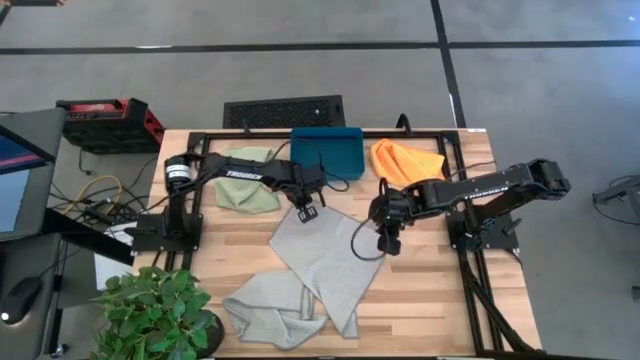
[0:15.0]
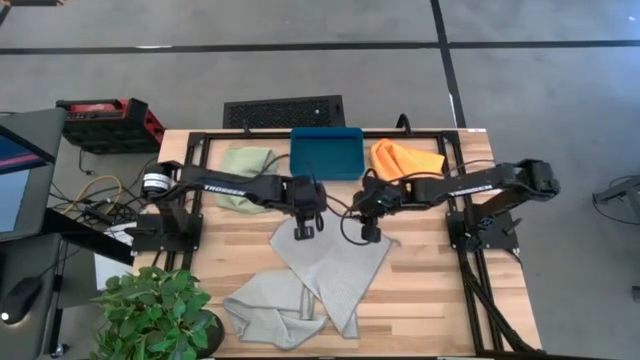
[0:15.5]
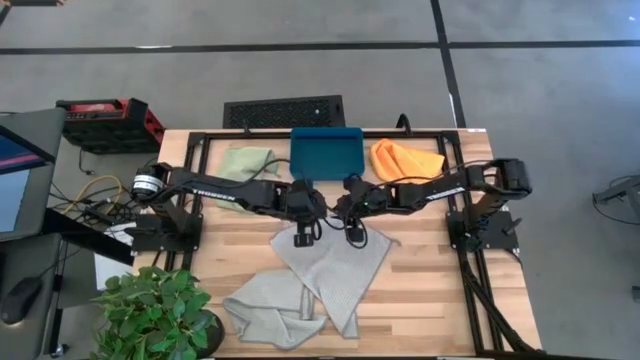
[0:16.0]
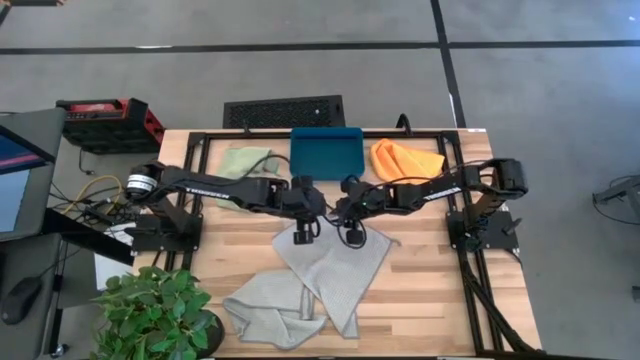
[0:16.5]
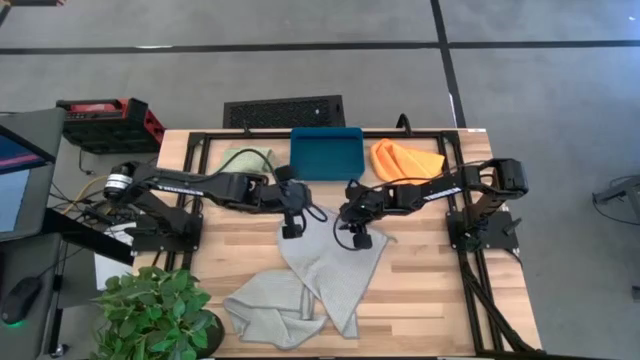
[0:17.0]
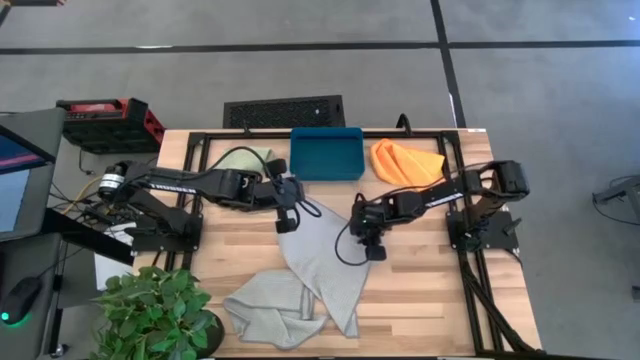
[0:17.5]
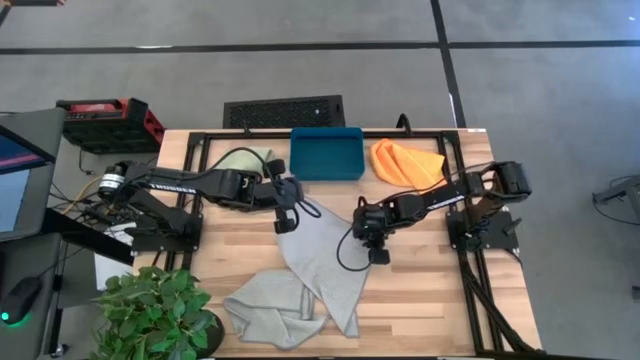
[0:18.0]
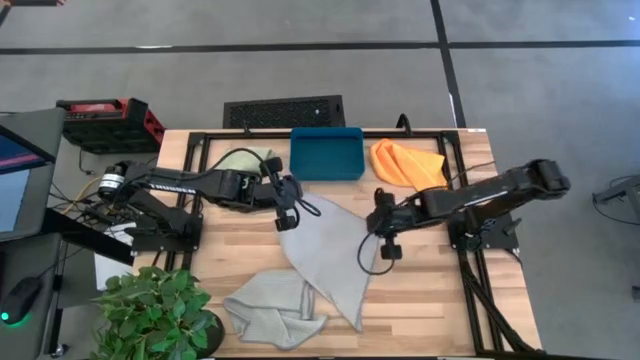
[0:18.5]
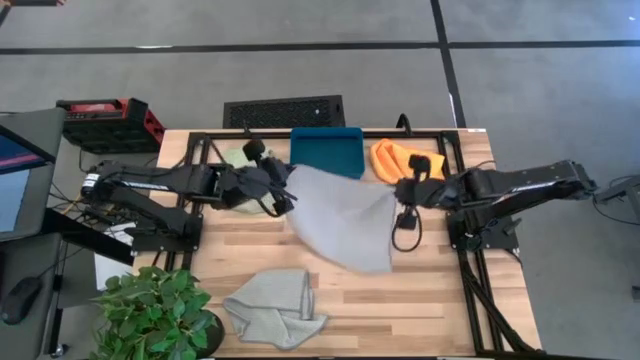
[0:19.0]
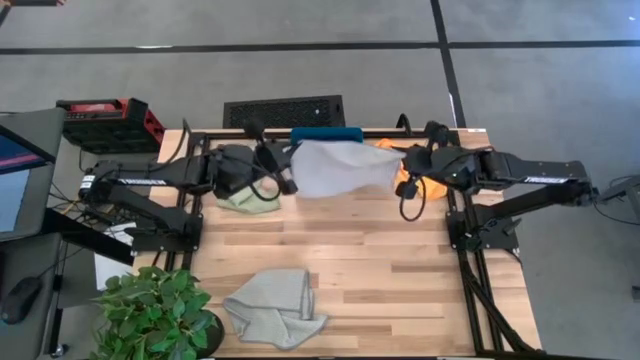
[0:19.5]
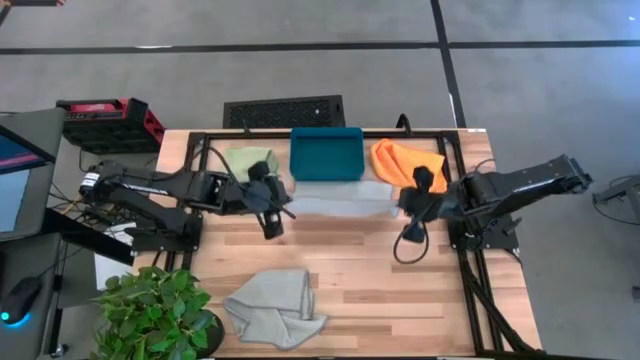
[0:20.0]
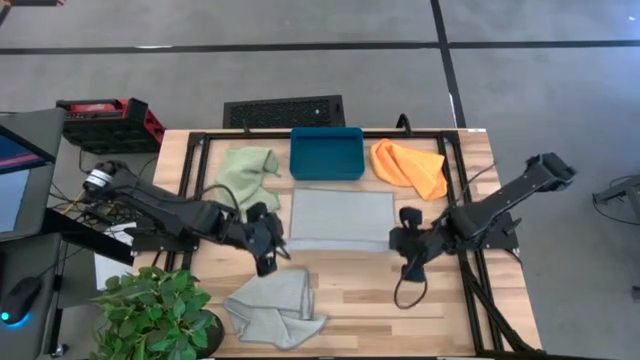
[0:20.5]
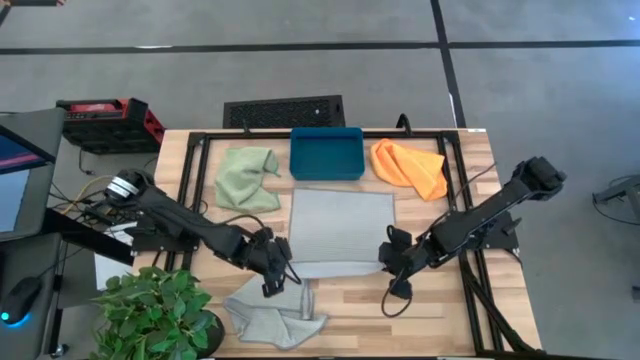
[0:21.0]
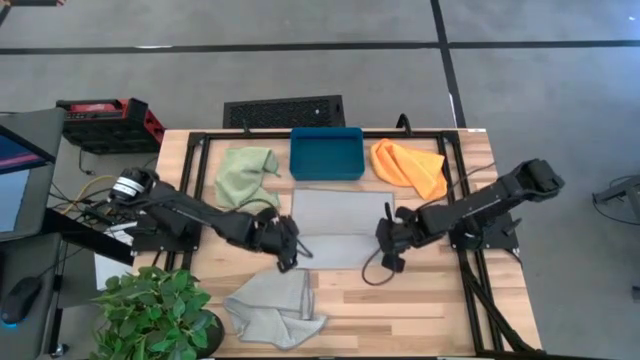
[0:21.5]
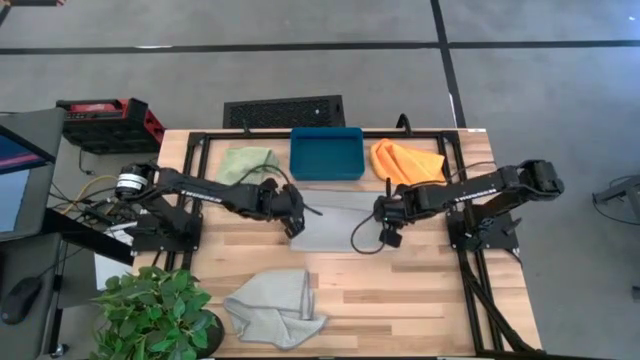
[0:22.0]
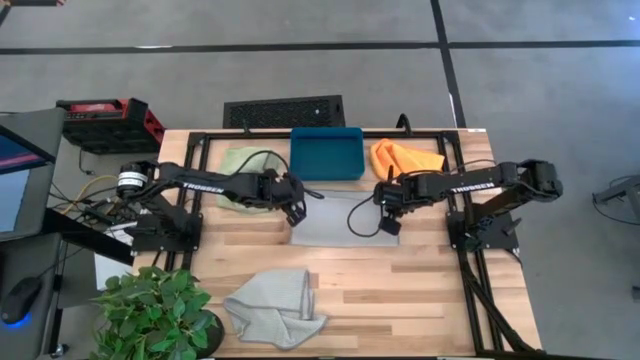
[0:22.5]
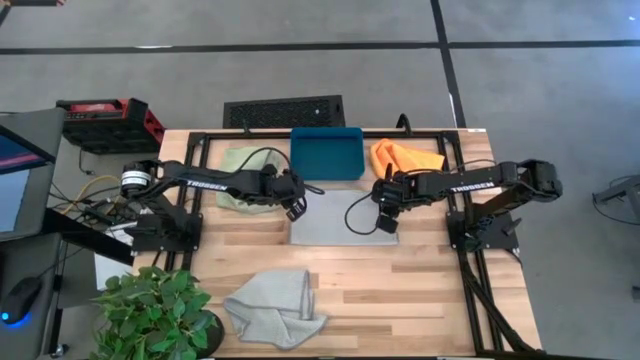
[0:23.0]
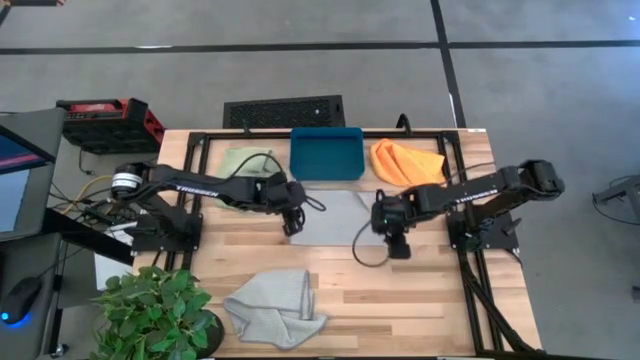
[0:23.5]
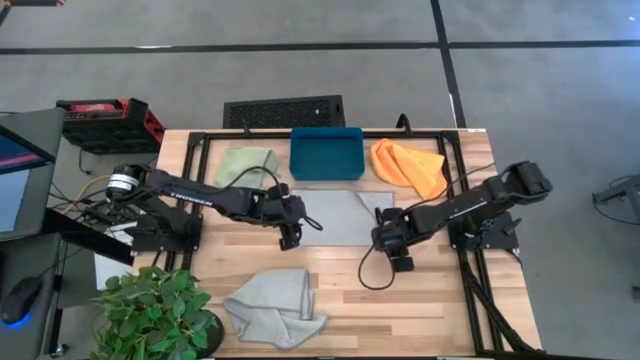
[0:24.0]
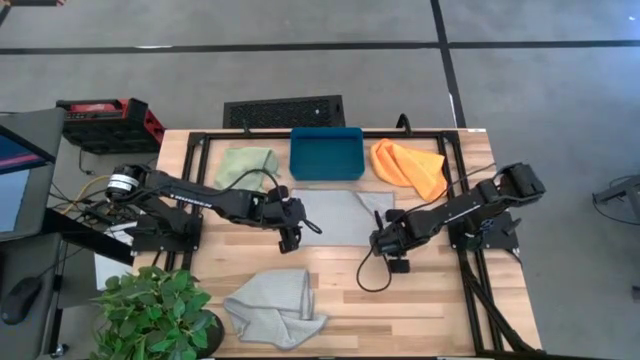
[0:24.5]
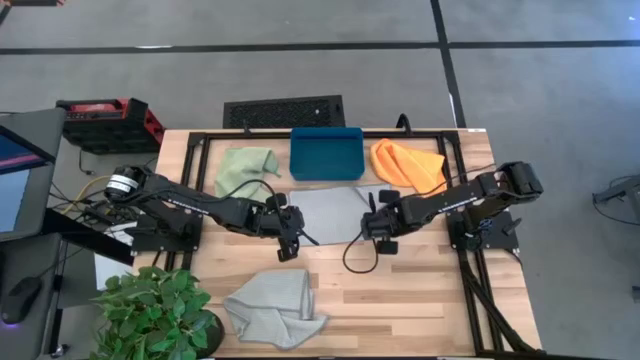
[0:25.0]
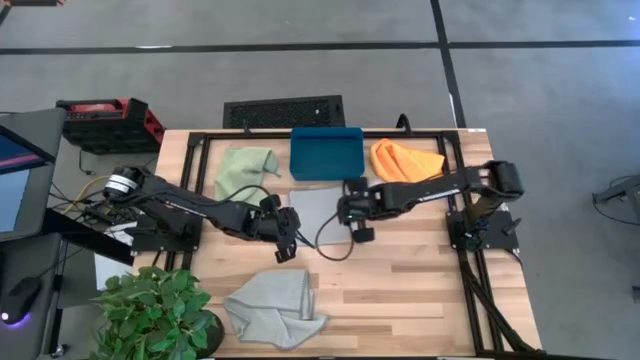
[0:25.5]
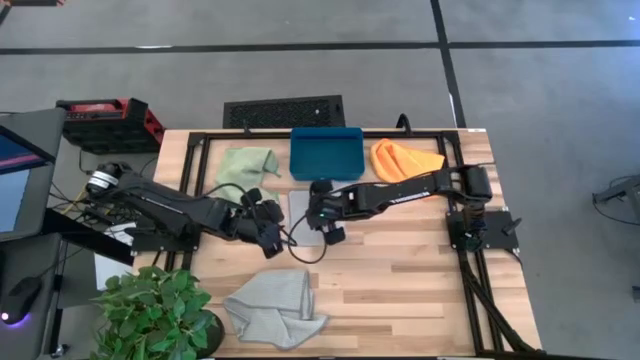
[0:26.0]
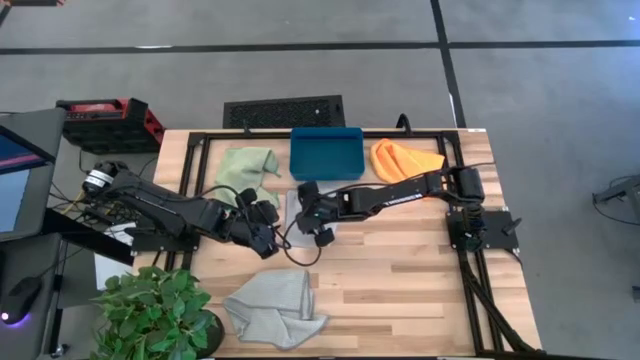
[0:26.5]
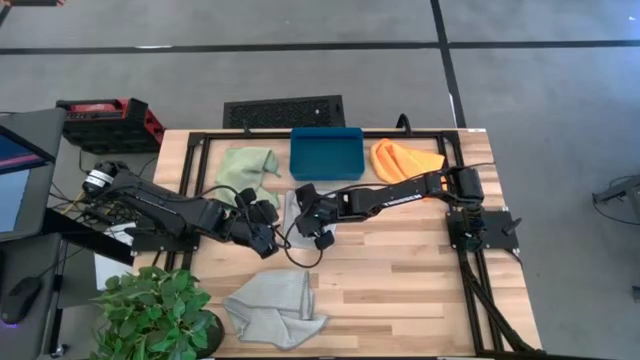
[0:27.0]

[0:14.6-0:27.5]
Task: Fold microfiber towels
Fold the right gray towel
